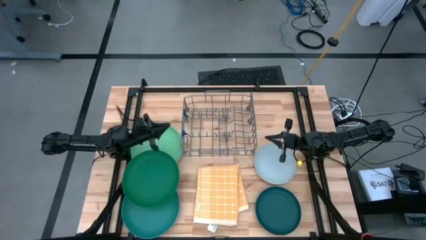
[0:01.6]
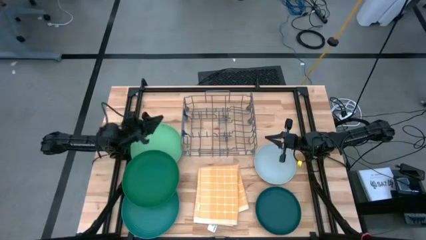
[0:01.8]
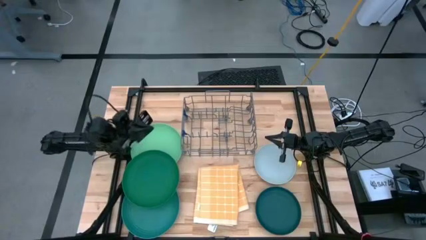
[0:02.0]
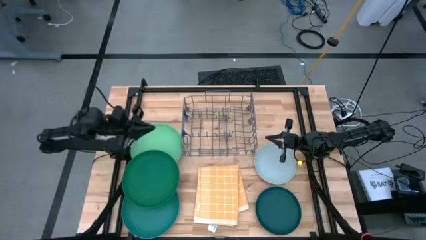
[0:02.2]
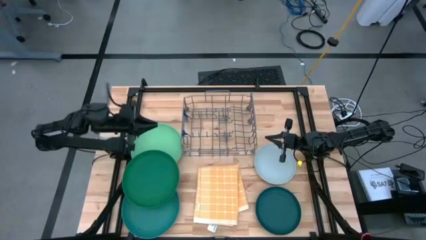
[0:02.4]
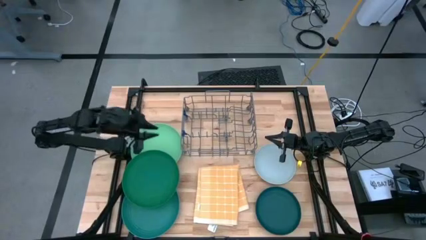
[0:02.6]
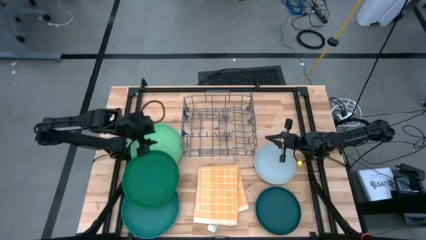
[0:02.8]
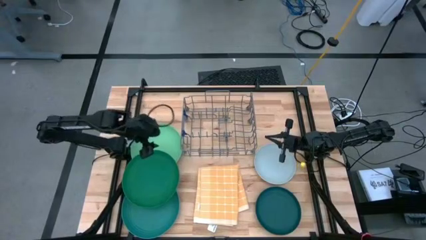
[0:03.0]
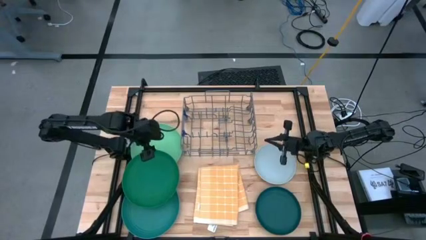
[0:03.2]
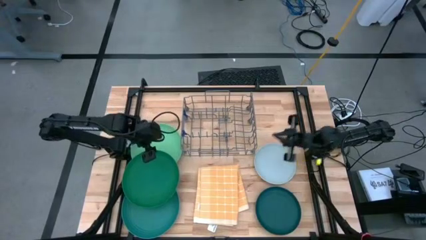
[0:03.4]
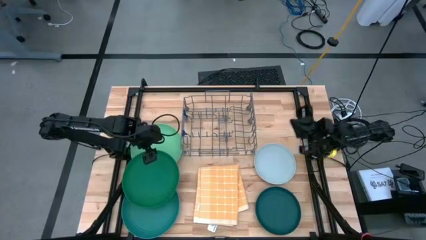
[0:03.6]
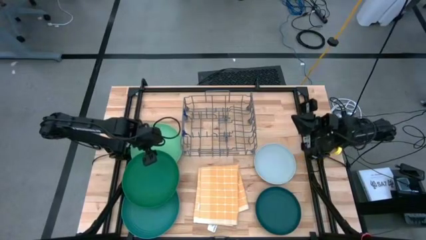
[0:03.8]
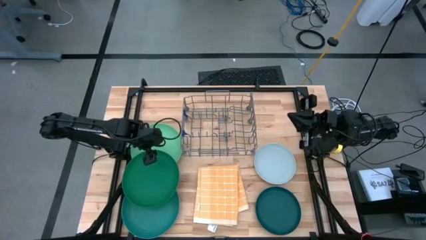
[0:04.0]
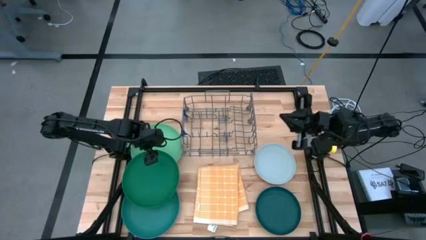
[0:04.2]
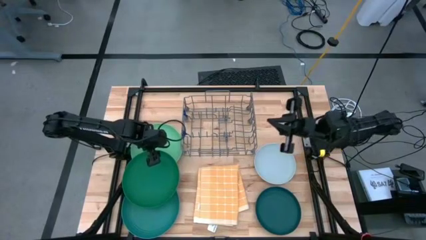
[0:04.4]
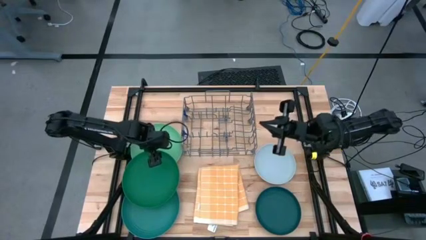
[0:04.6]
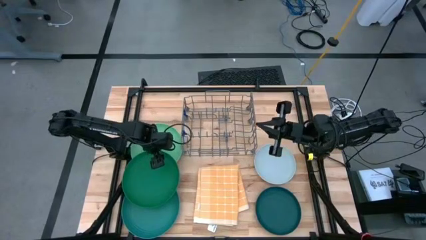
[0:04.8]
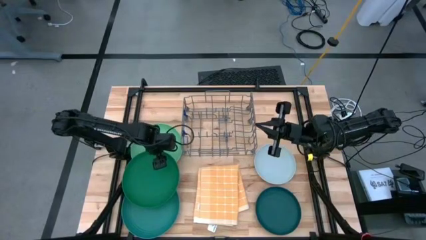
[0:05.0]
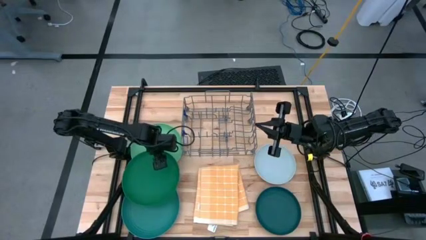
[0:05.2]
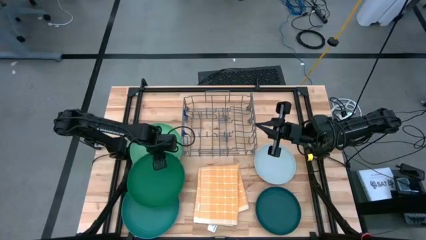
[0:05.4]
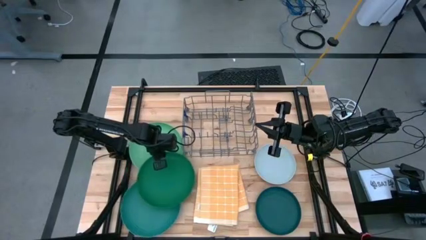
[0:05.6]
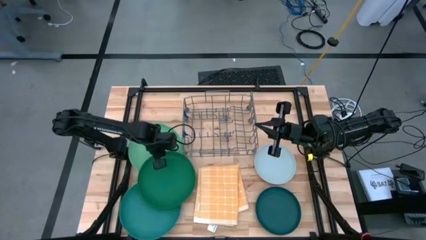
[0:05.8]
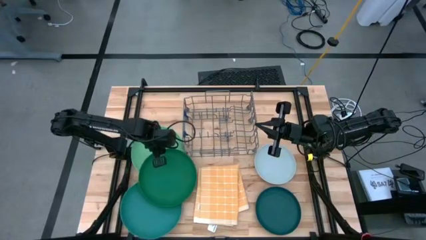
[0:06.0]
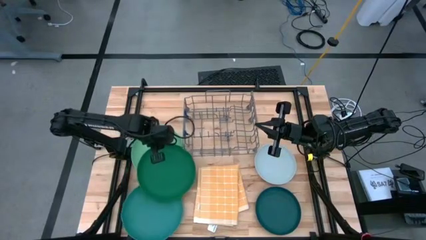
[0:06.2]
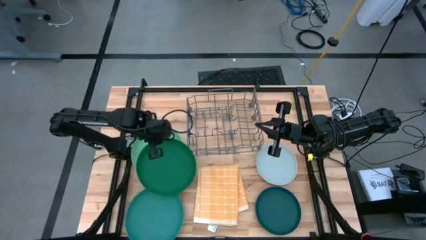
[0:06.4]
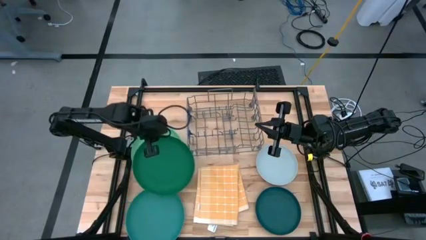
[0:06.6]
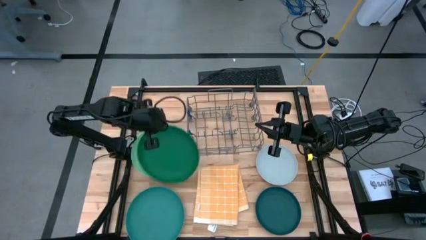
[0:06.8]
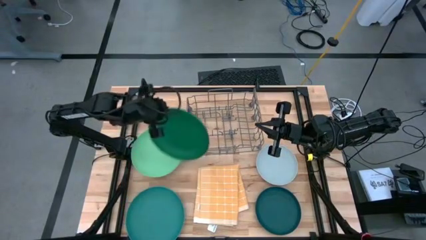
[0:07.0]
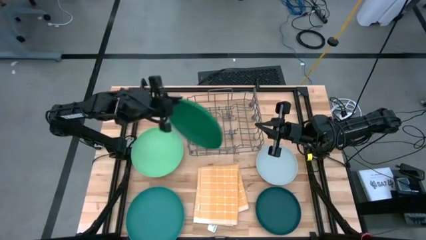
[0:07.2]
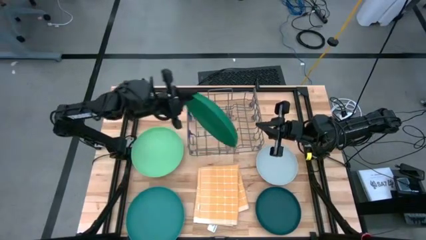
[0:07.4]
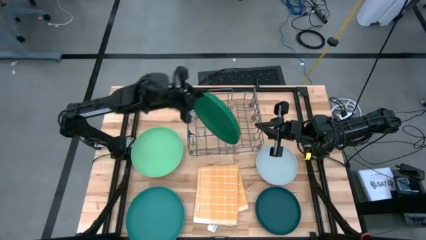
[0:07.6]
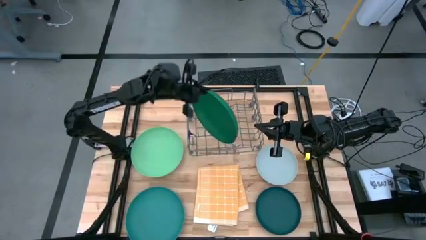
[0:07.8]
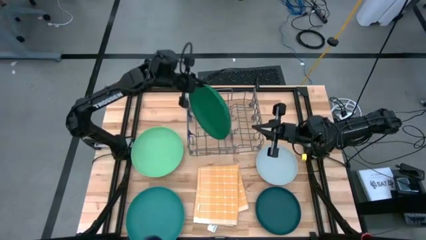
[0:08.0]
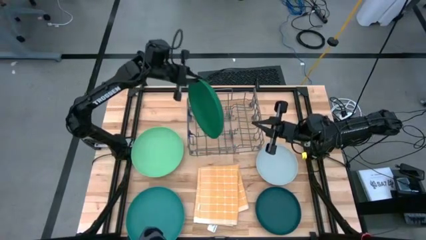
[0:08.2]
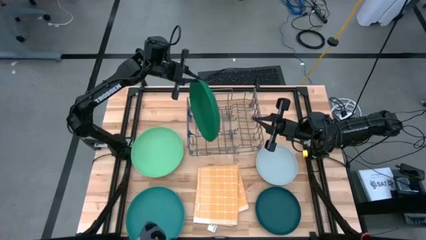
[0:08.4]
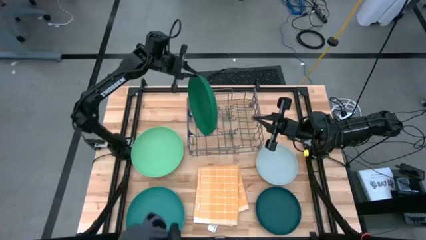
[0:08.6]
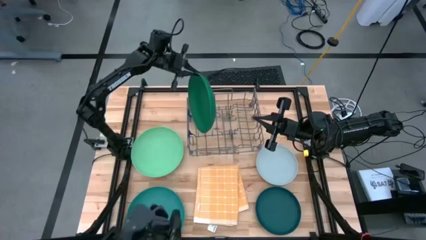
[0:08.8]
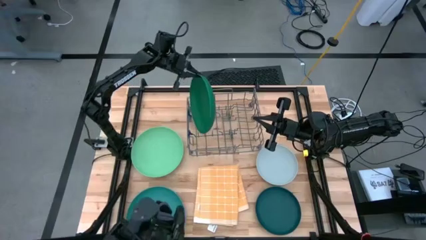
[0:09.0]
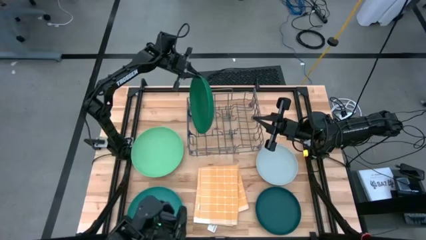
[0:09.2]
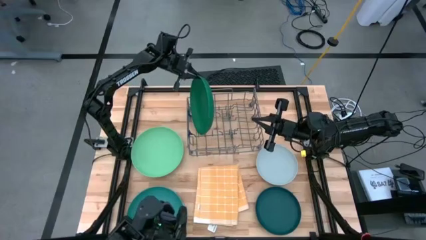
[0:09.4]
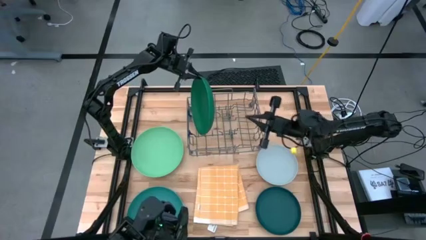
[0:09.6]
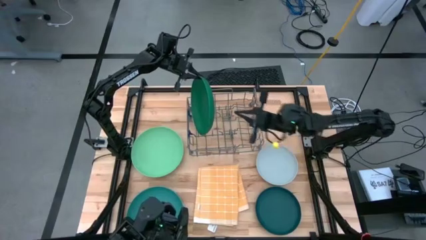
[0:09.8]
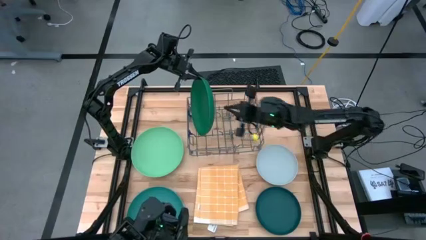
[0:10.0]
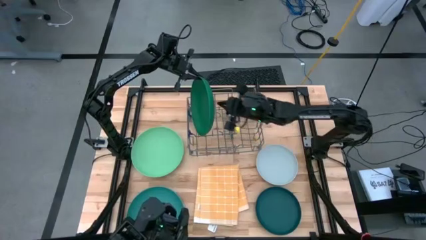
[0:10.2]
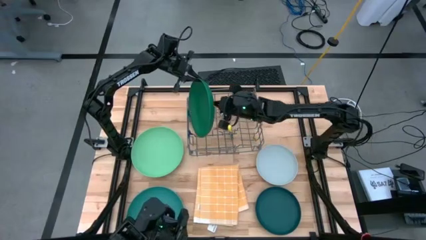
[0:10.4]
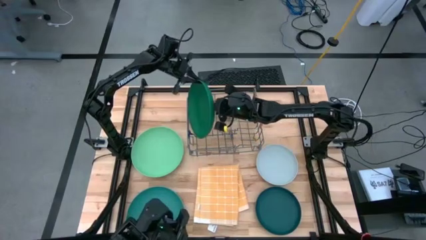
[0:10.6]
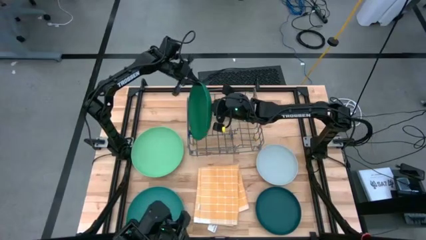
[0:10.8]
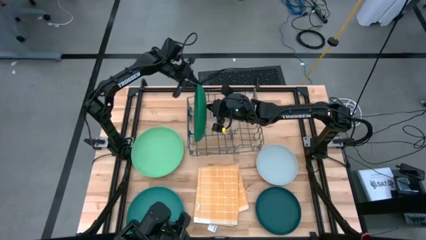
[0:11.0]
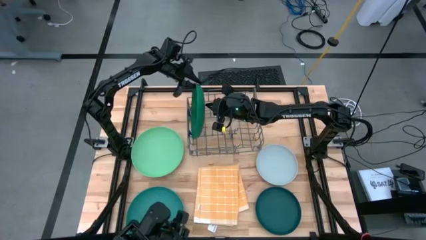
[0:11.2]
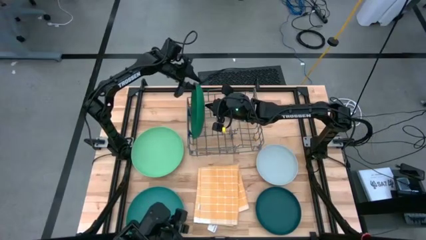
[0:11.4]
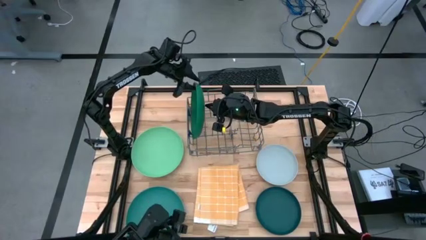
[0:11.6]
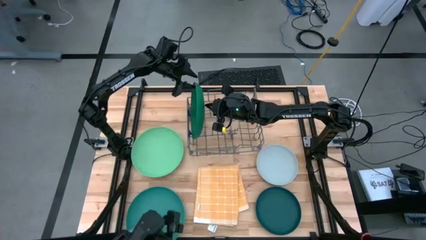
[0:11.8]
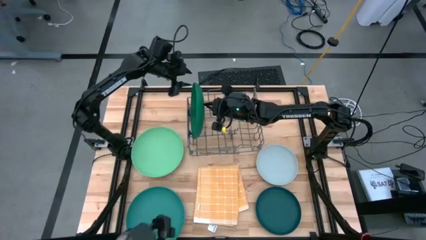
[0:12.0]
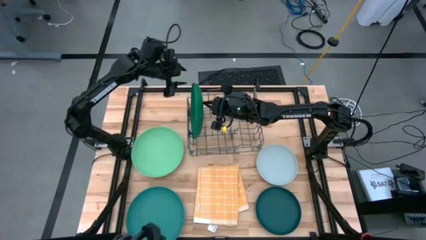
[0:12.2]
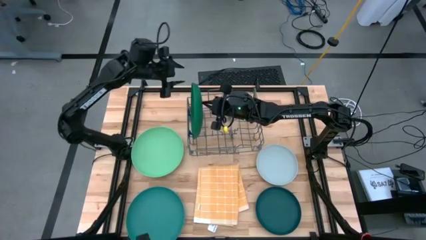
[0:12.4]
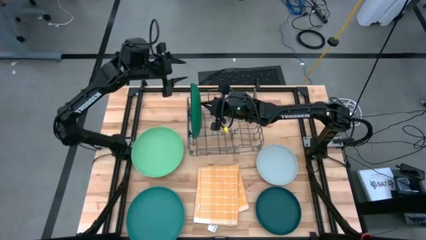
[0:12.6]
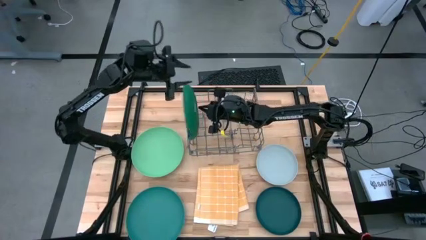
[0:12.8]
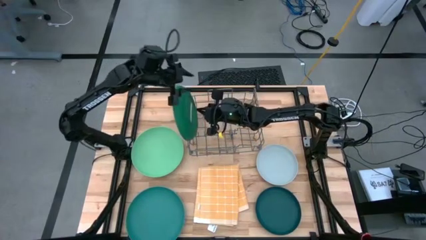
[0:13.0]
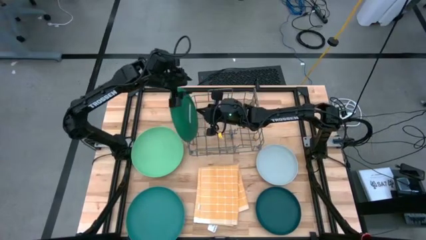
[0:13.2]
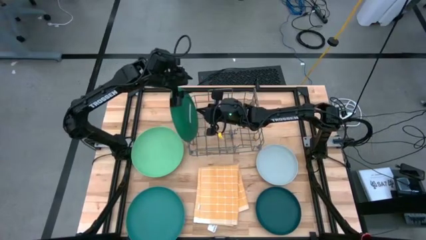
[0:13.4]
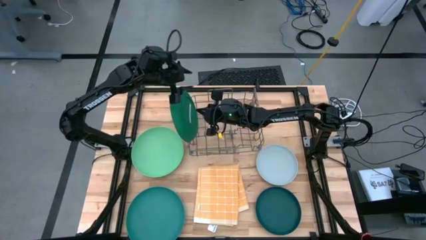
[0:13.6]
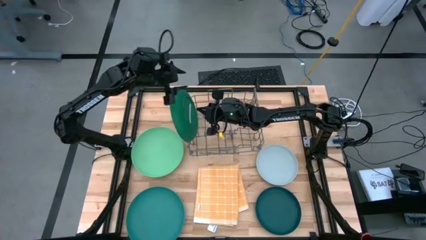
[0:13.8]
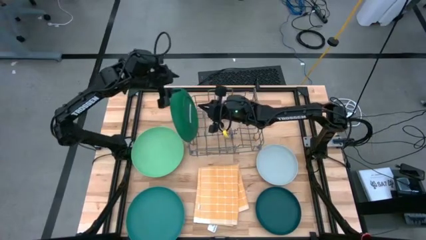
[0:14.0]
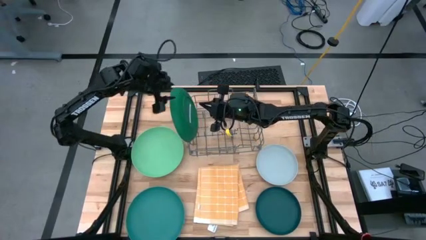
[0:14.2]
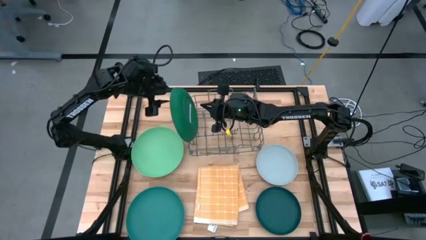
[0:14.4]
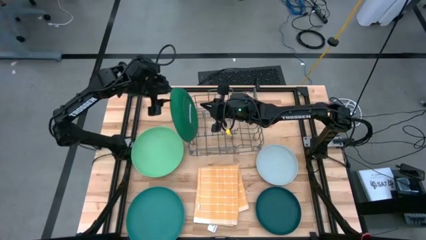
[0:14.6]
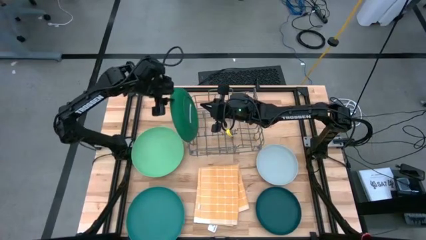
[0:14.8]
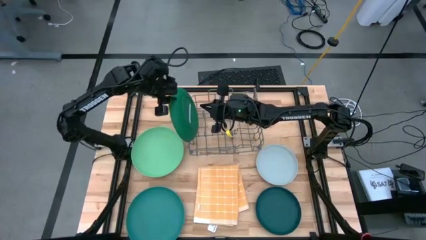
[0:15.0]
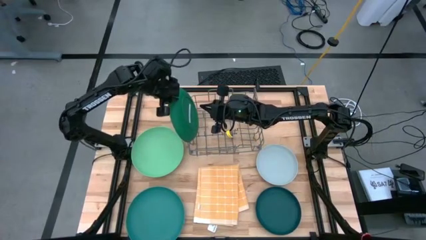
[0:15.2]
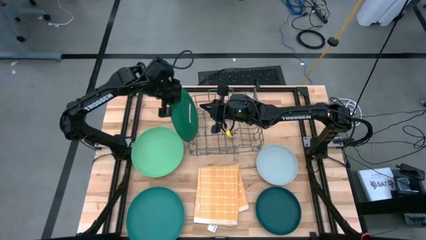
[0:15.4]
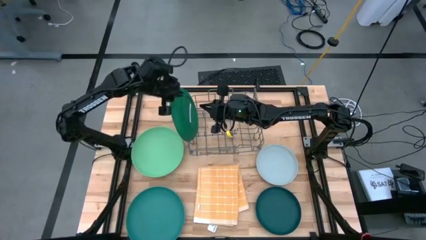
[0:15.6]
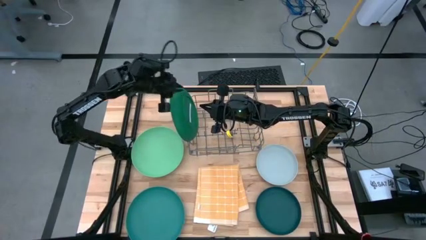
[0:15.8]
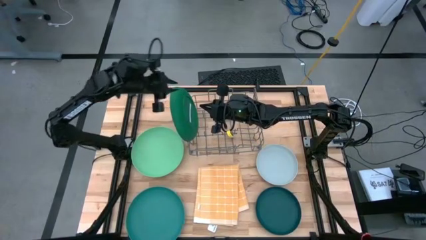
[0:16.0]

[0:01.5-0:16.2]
Task: Sort dishes
Put the green plate in the dish rack
